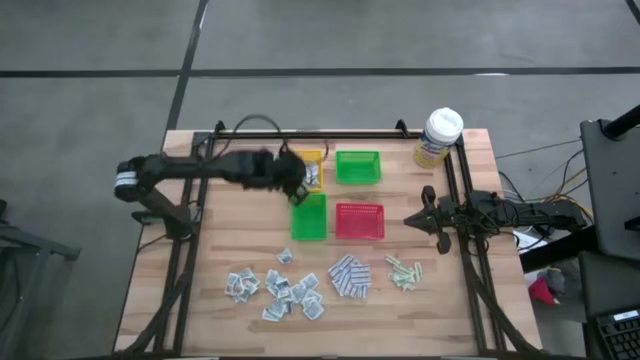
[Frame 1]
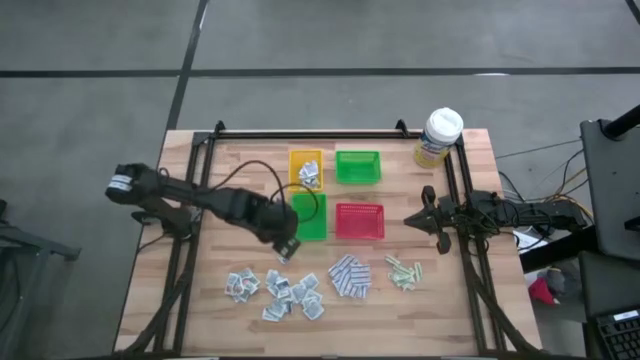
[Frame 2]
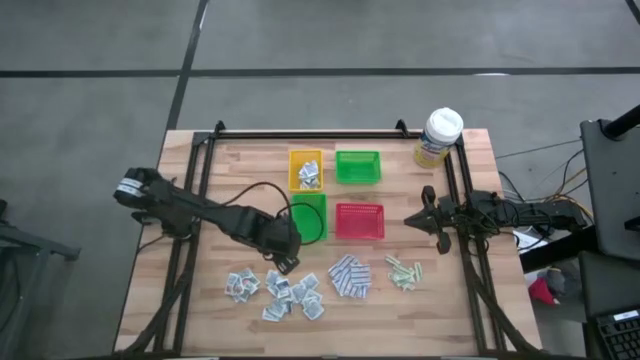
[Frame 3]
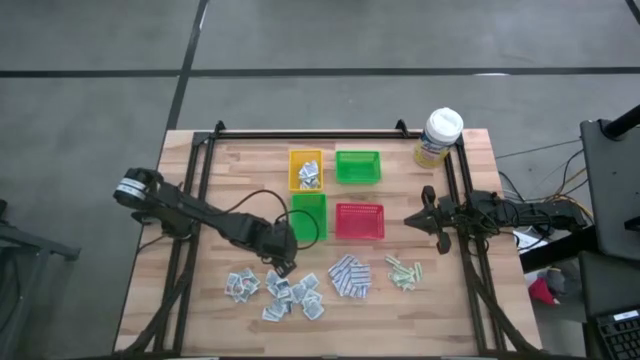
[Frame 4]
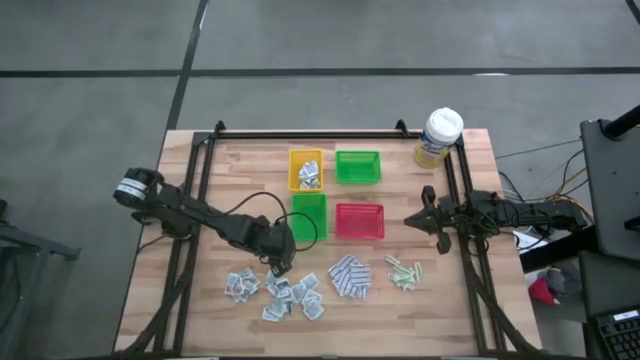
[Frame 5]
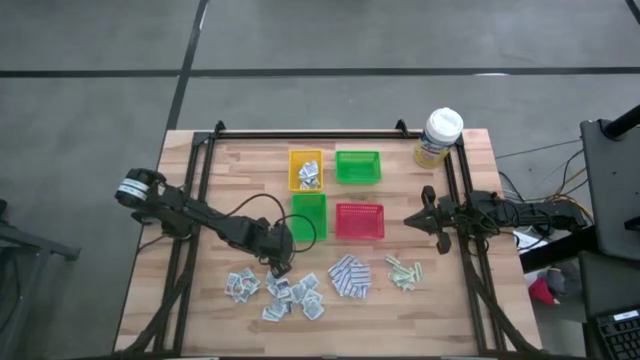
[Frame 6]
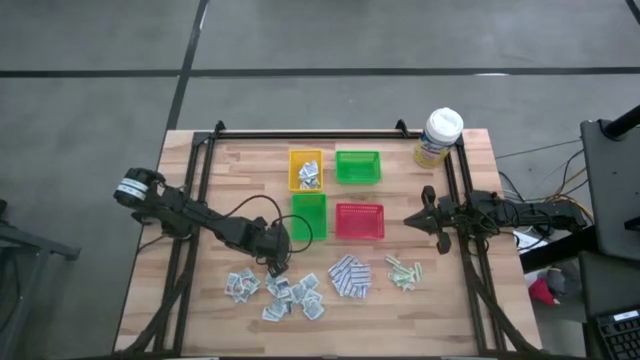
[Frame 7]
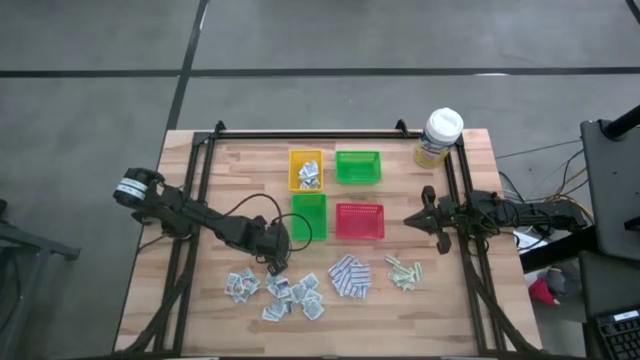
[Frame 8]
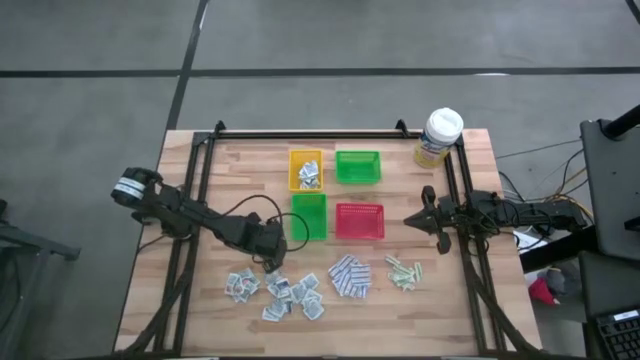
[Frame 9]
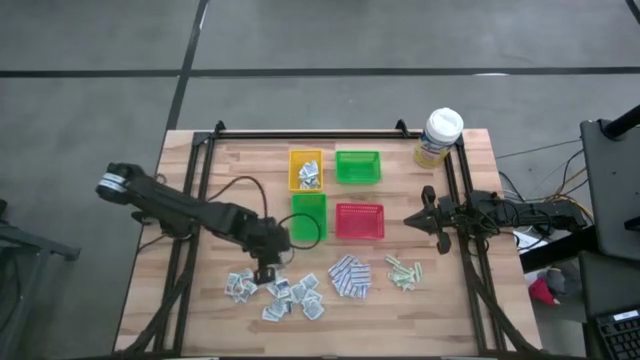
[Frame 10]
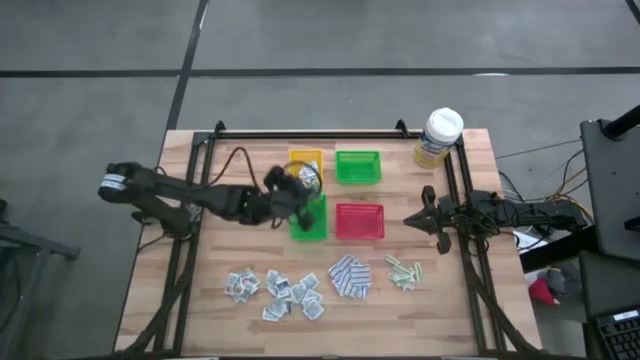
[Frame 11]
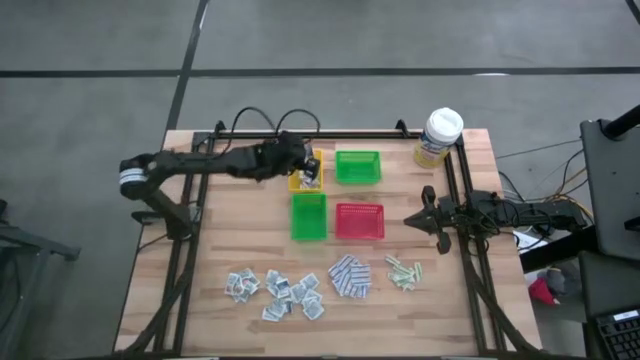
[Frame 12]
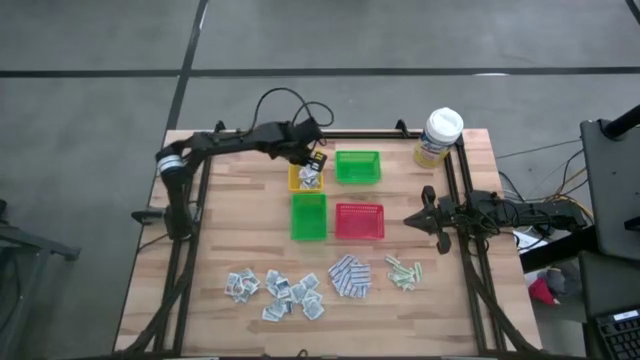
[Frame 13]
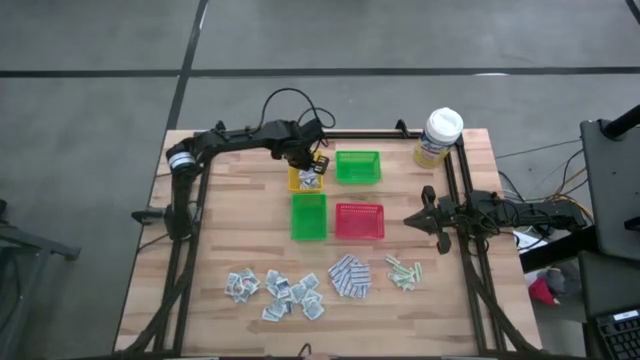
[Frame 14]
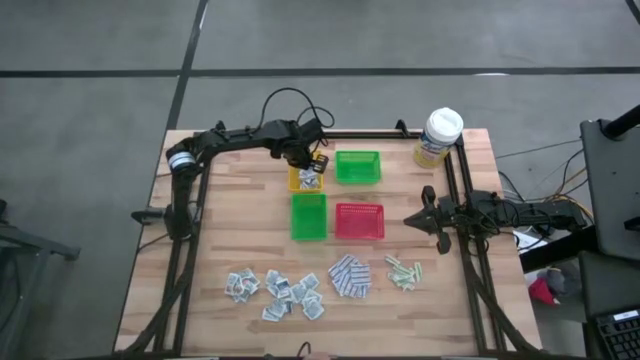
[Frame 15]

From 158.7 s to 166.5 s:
Task: Pick & Place First Aid Supplies
Put the blue alcohol pad into the yellow bin

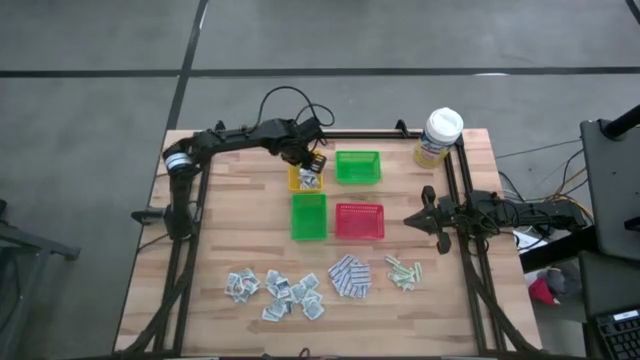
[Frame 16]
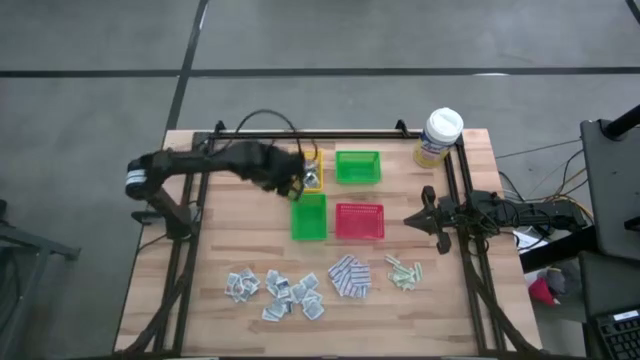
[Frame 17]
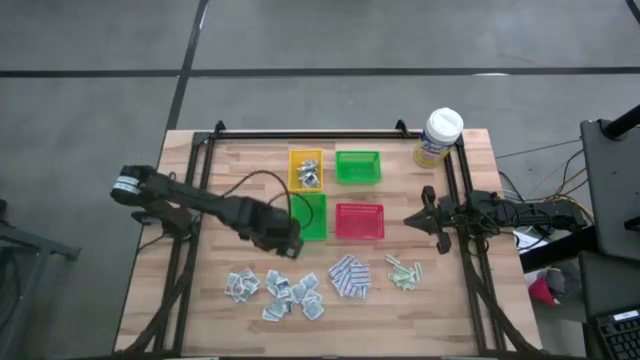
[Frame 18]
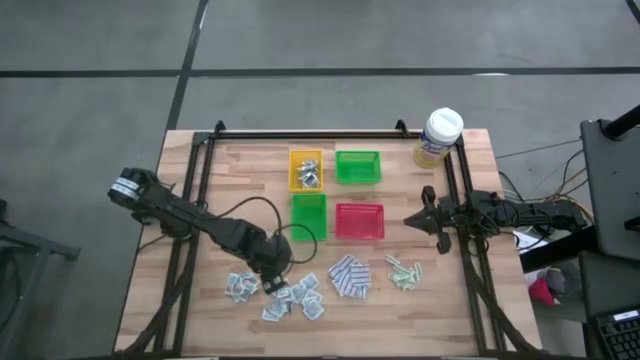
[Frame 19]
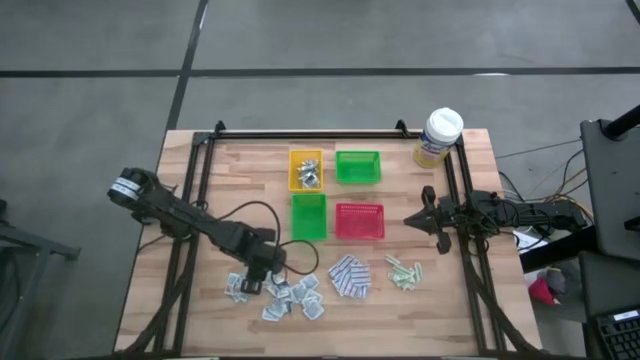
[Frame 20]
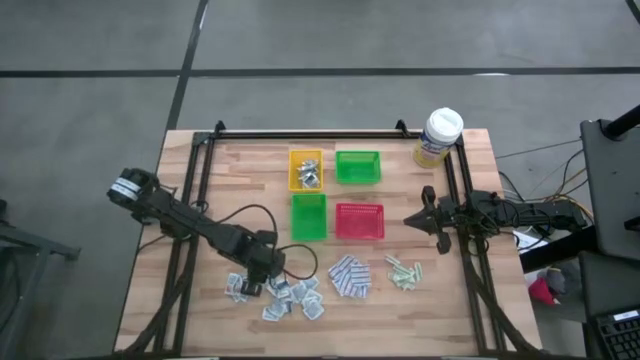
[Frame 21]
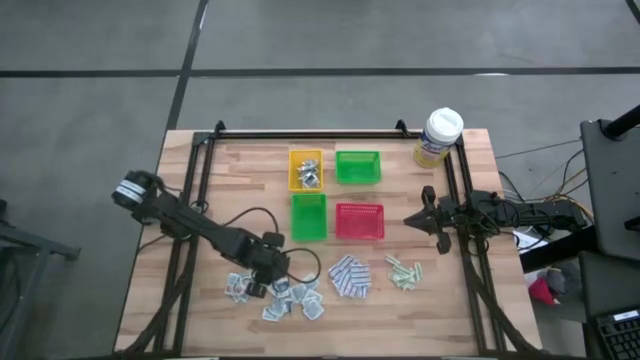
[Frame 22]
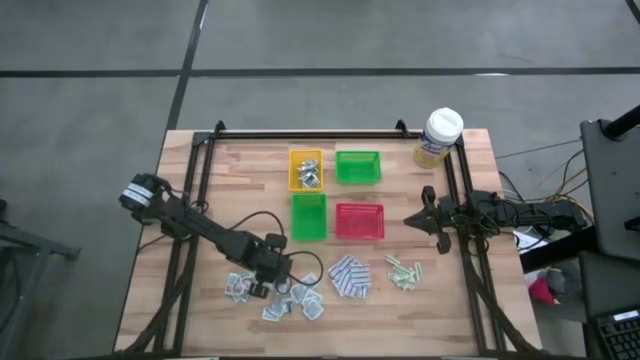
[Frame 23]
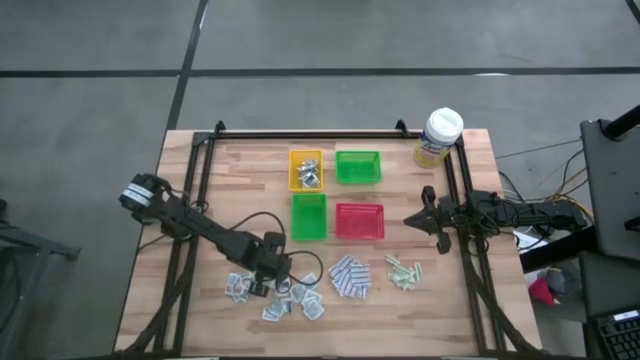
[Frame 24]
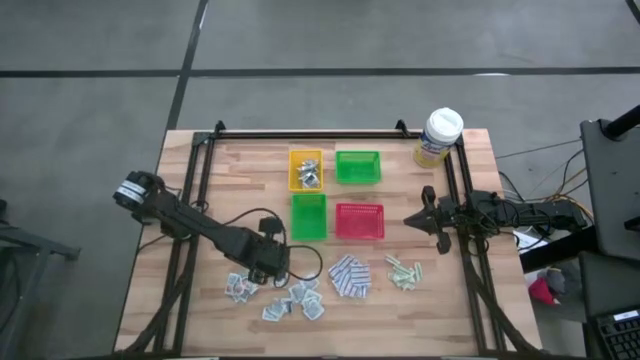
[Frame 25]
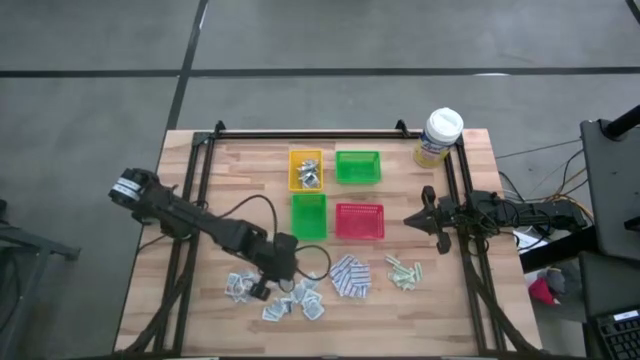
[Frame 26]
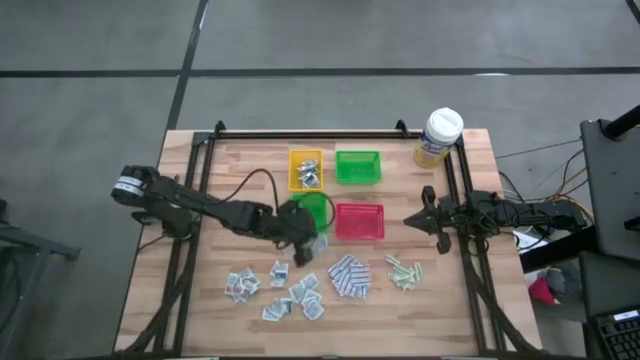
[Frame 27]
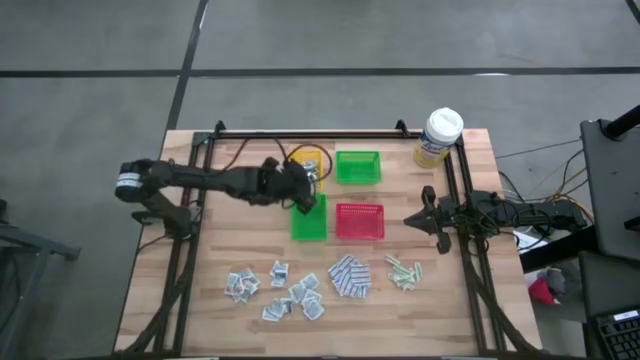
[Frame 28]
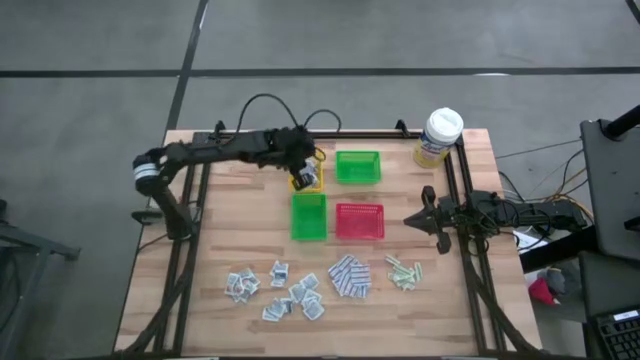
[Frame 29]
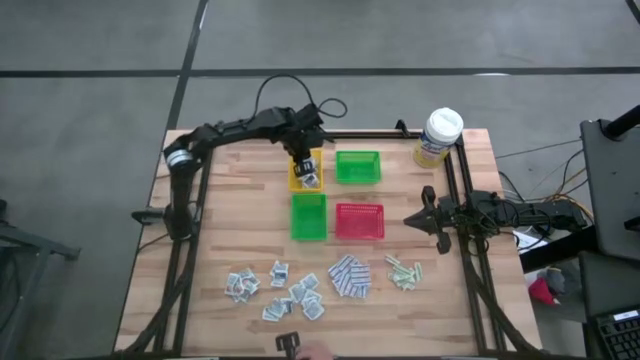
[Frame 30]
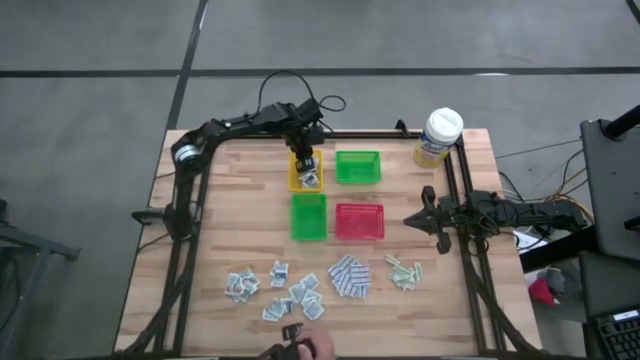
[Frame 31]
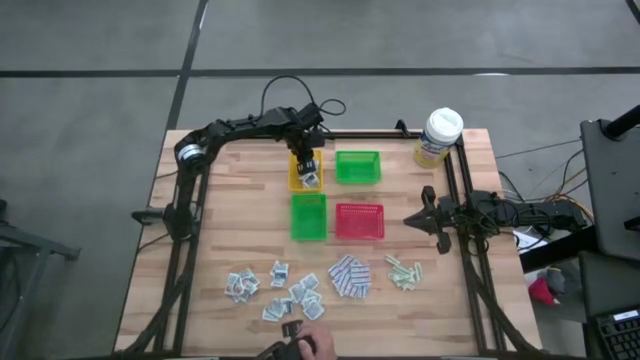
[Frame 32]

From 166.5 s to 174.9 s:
Put the blue alcohol pad into the yellow bin

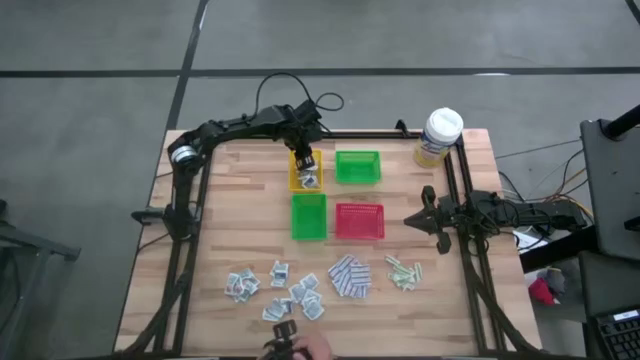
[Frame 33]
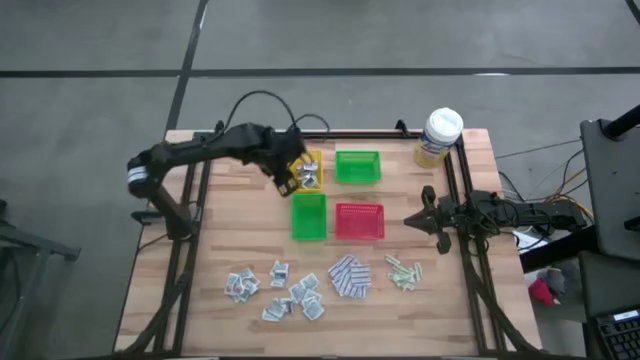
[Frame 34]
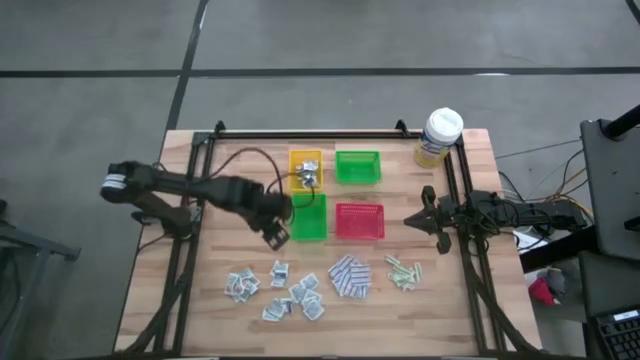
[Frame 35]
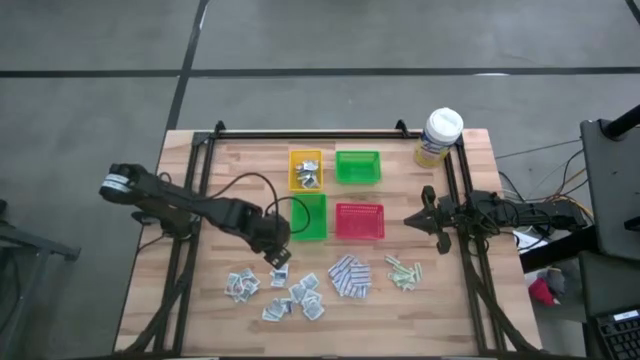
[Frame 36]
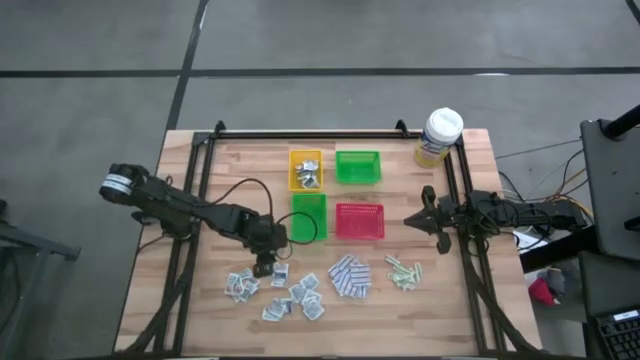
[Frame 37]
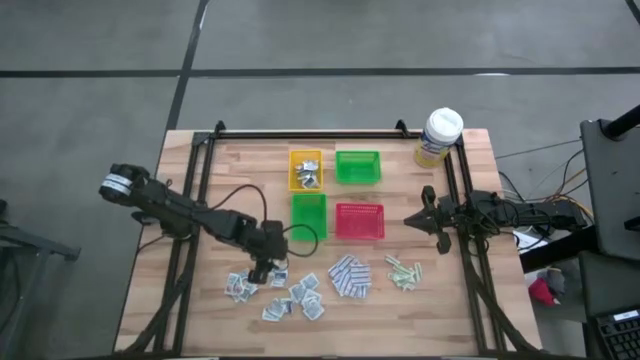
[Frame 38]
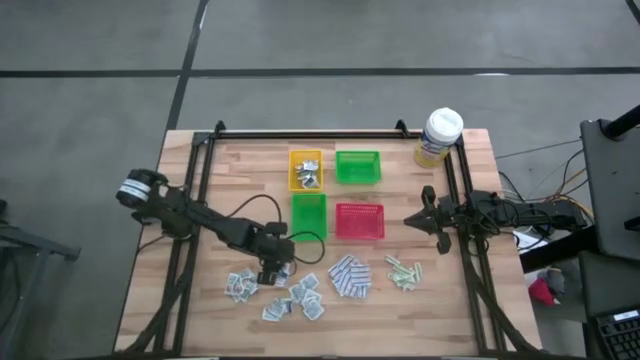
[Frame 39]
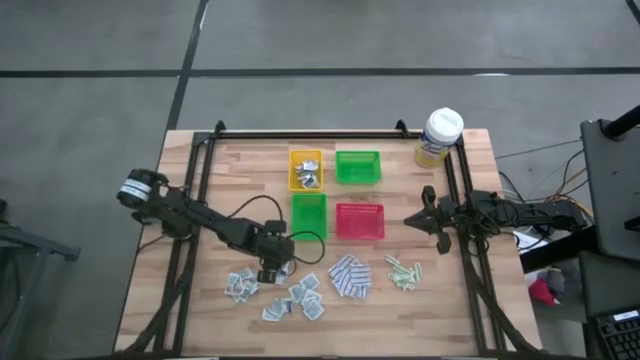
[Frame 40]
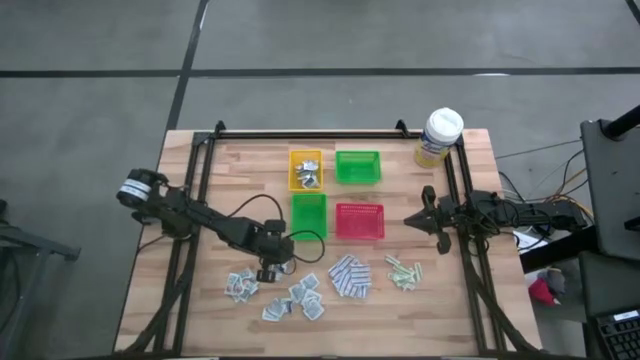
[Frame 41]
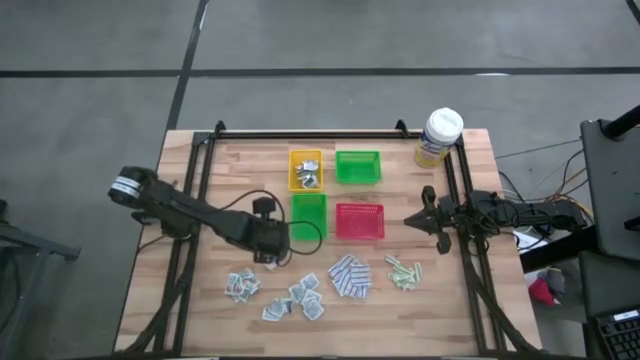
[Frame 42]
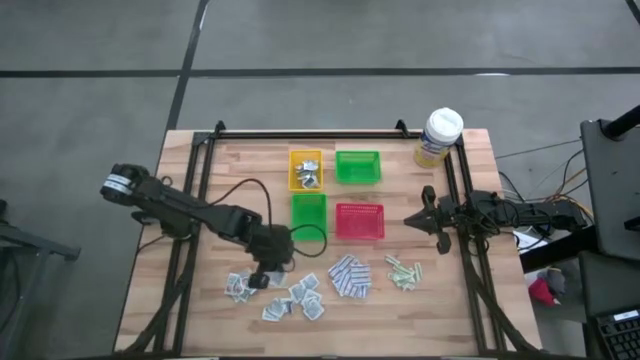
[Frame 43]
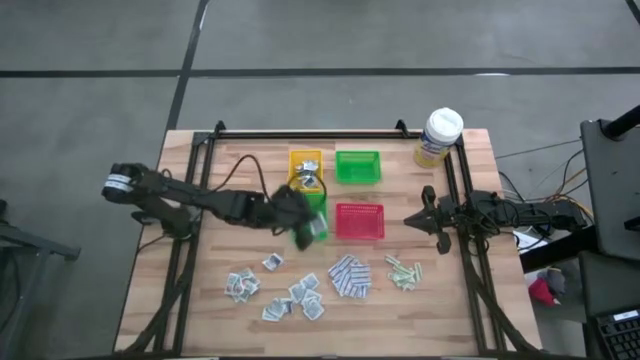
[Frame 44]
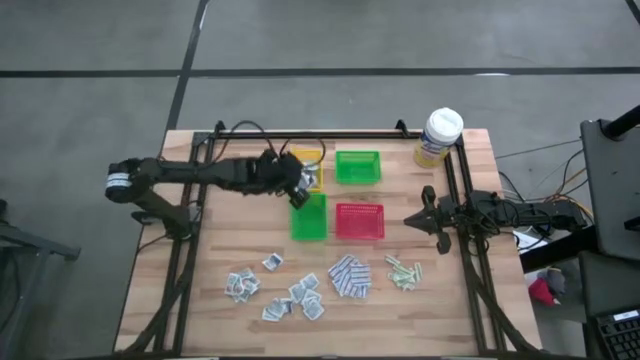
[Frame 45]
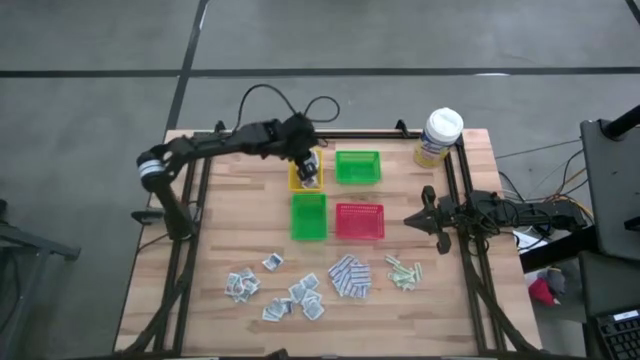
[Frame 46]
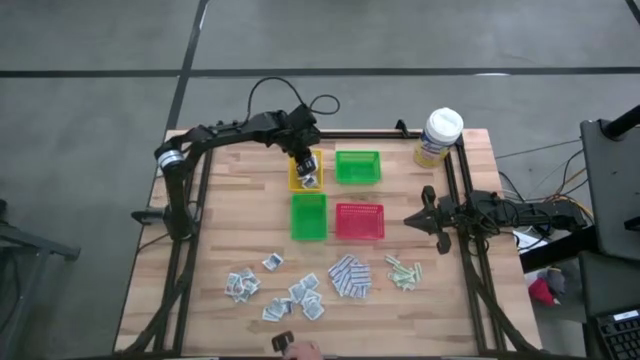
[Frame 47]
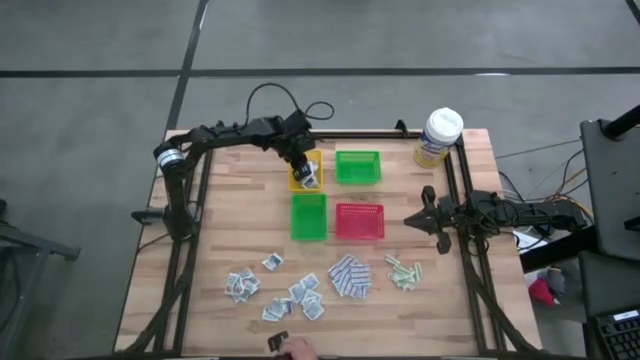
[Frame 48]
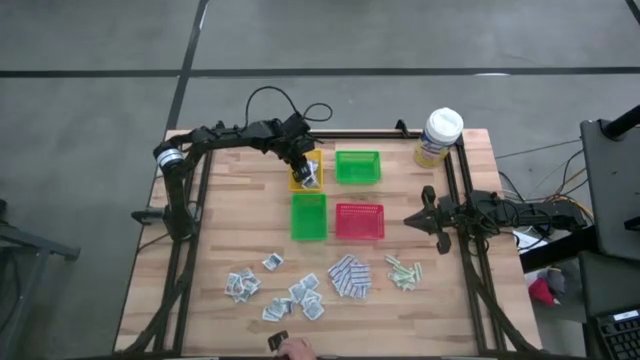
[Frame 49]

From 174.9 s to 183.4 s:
Put the blue alcohol pad into the yellow bin
